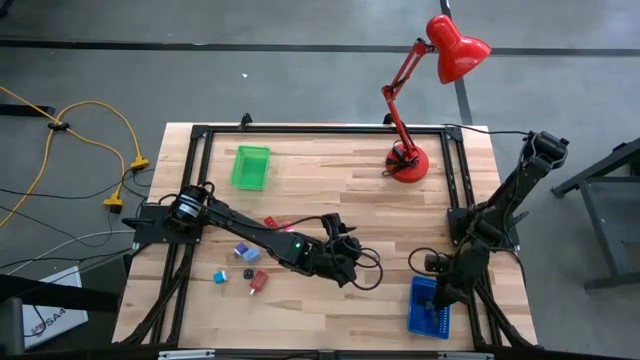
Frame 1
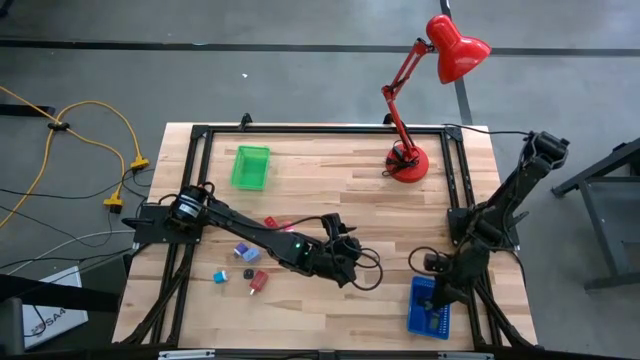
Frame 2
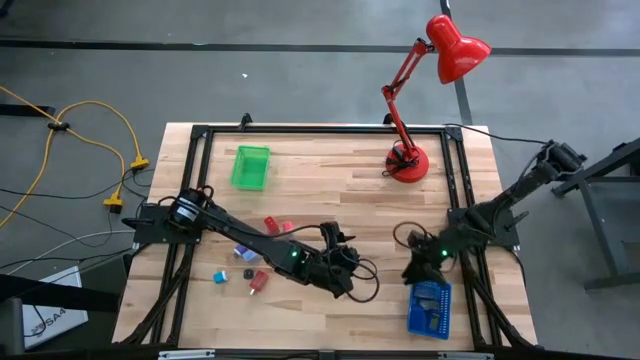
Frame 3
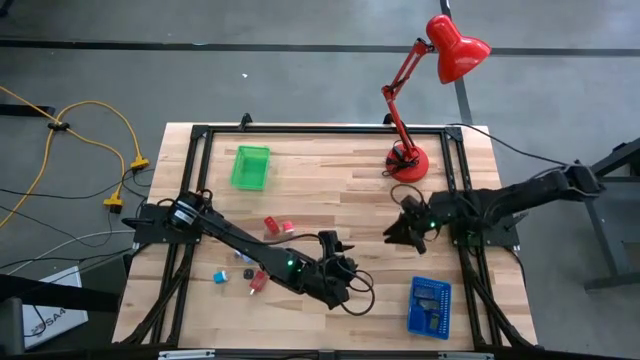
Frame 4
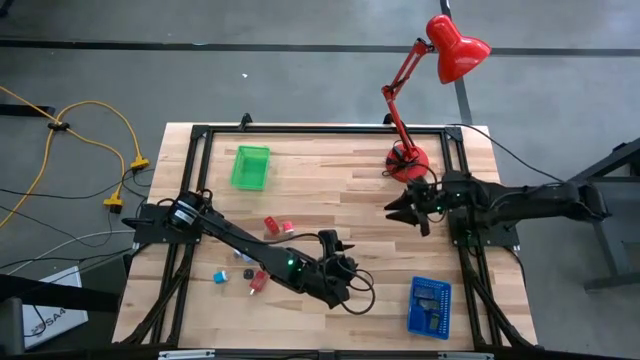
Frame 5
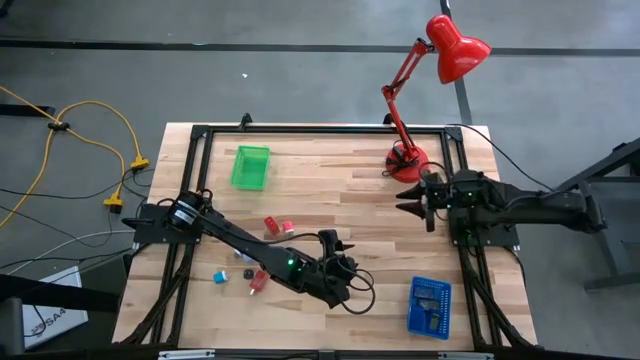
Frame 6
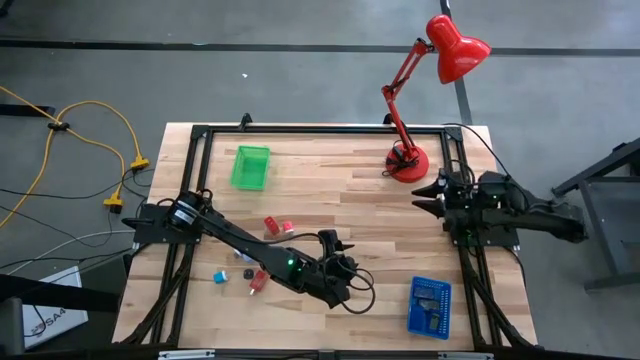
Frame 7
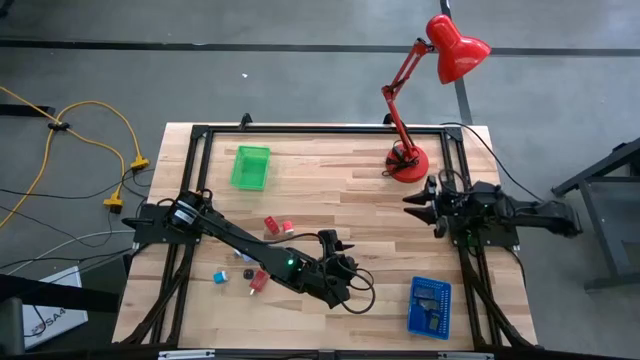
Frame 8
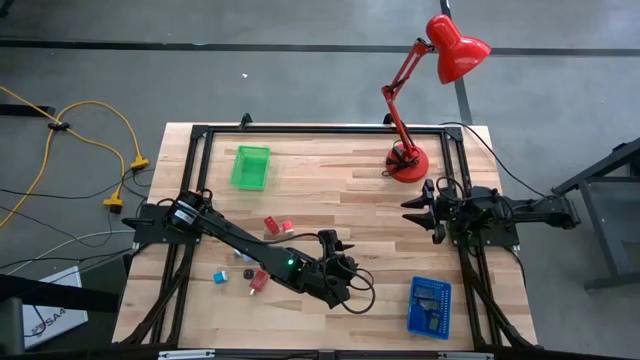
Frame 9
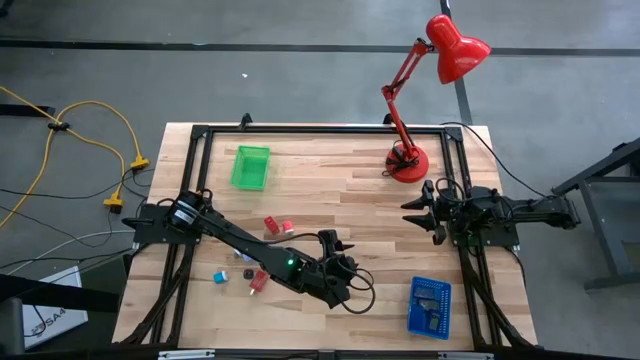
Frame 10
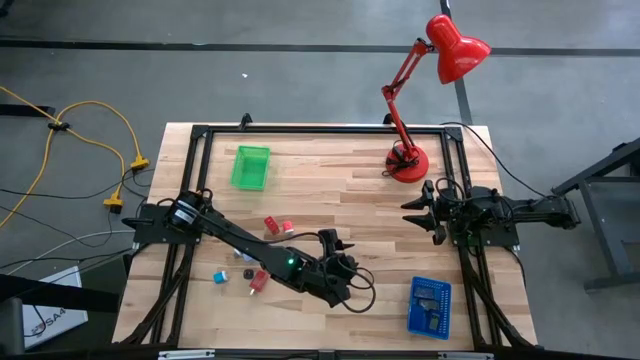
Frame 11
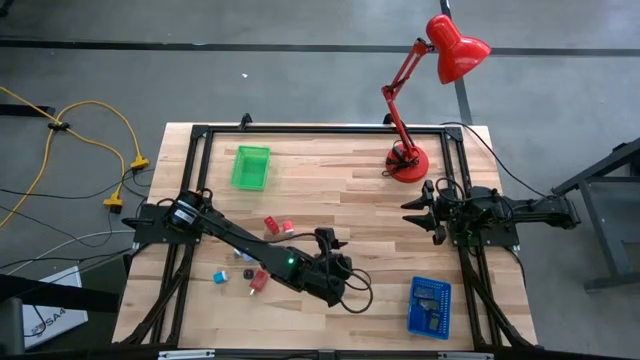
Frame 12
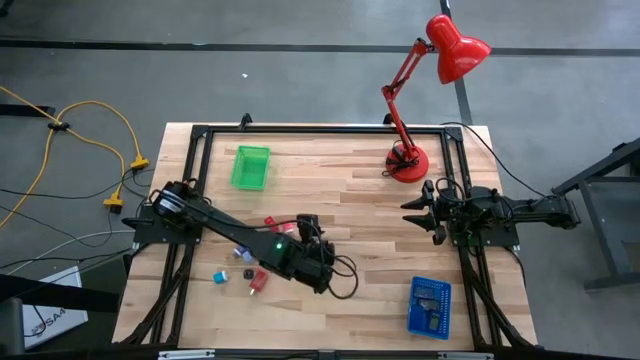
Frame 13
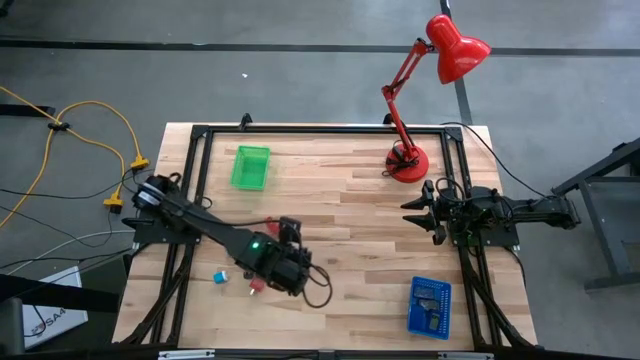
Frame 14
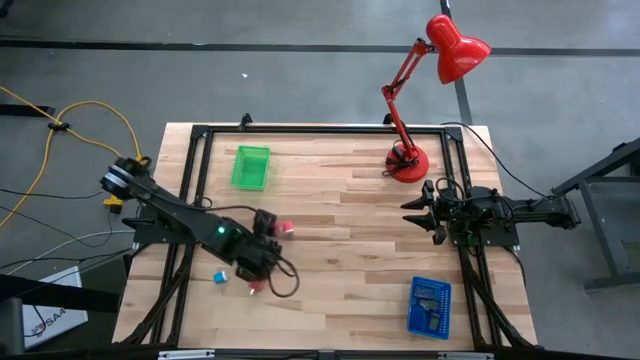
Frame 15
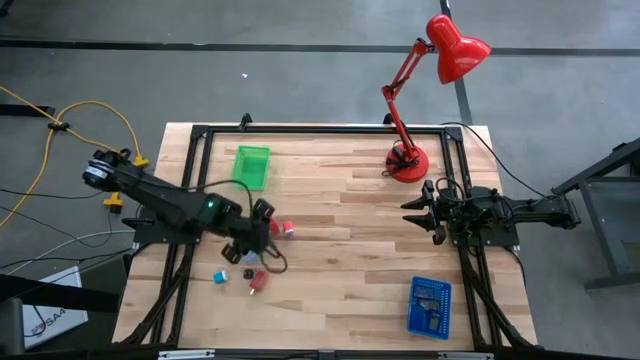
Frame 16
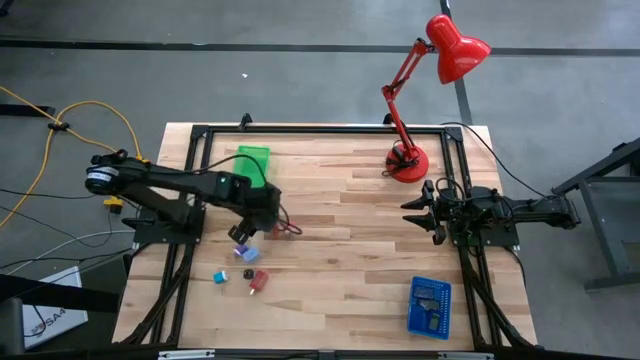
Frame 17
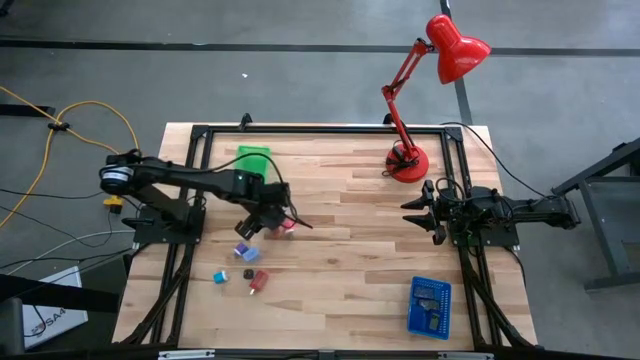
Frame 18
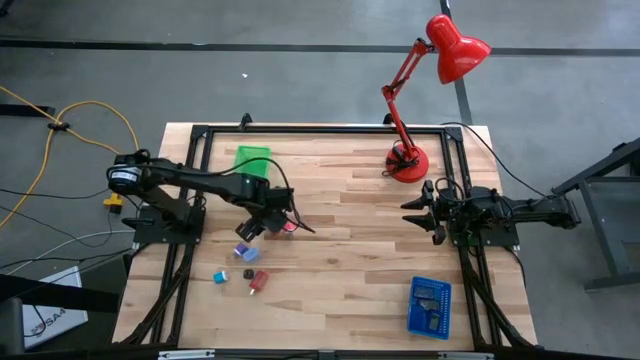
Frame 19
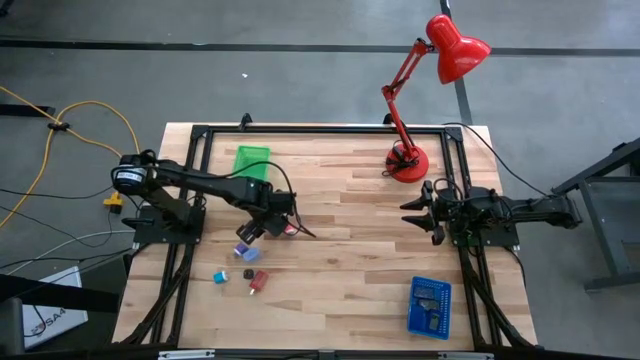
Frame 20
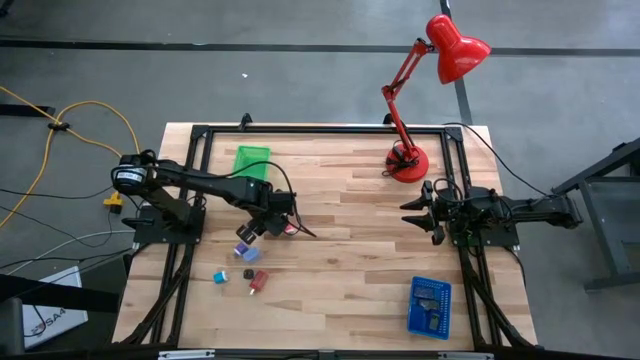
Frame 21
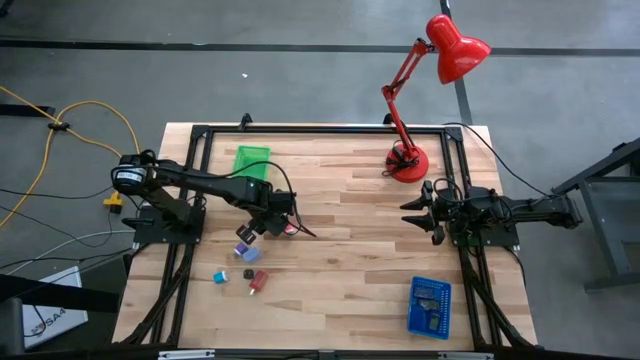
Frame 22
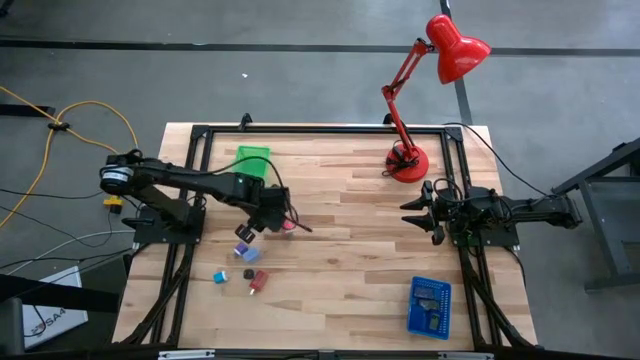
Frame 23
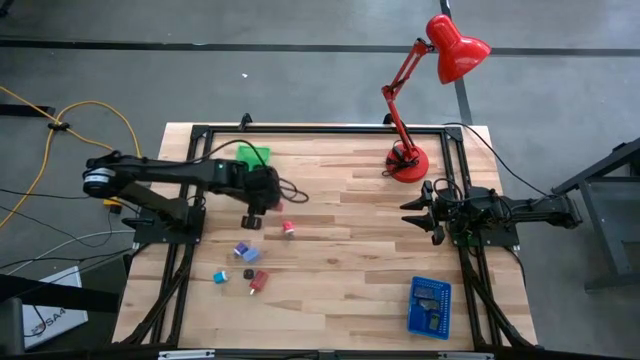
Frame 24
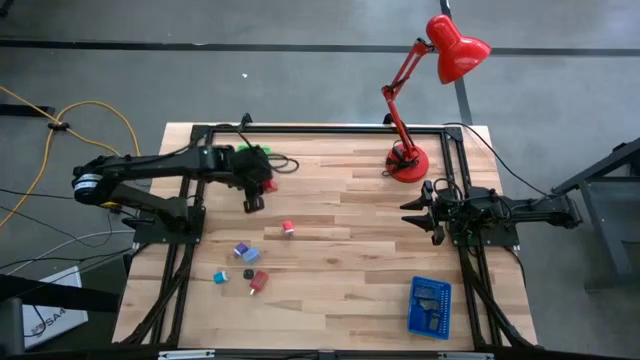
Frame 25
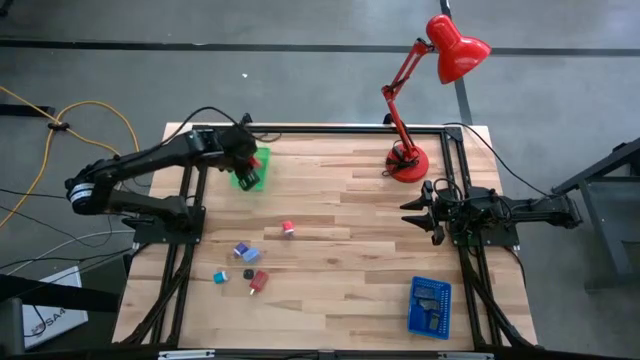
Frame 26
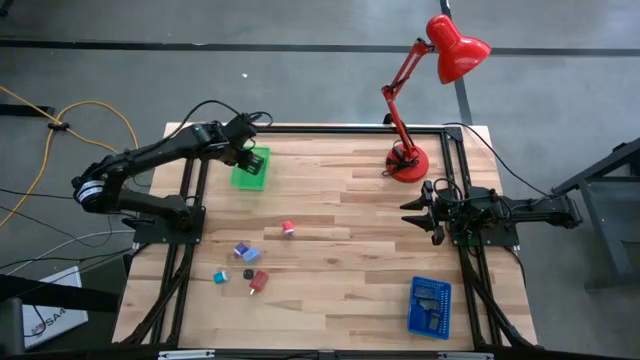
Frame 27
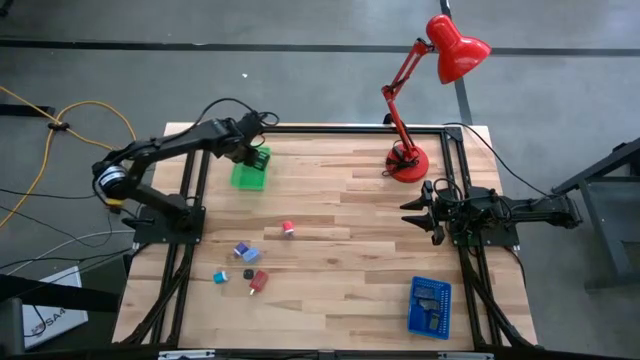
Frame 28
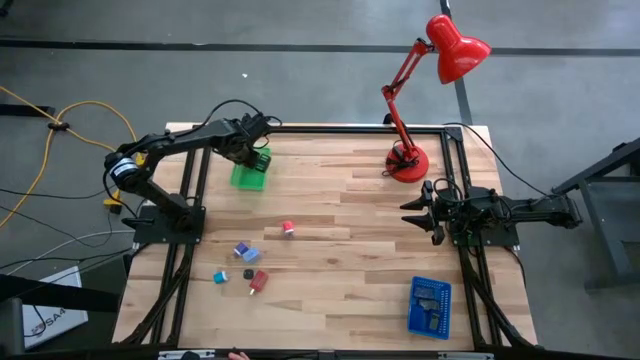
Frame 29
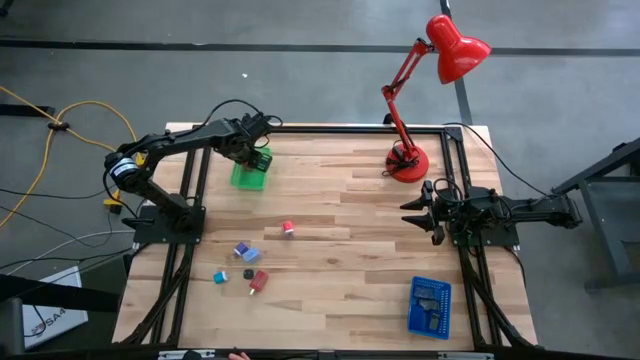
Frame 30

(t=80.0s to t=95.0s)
Task: Pick & Place Office items
Put the top red charger adapter into the green bin

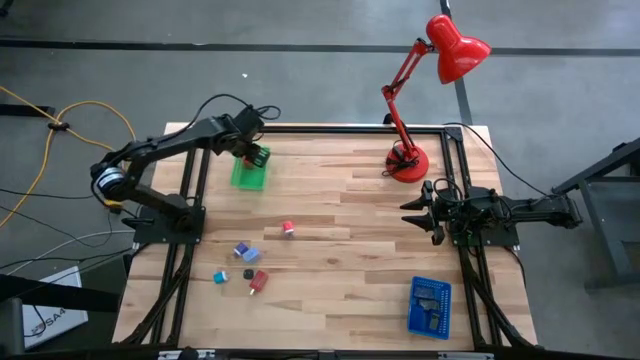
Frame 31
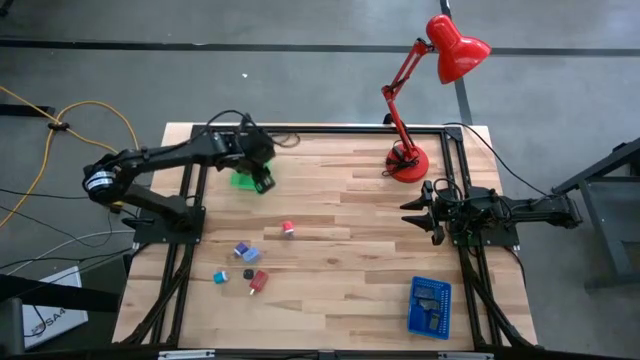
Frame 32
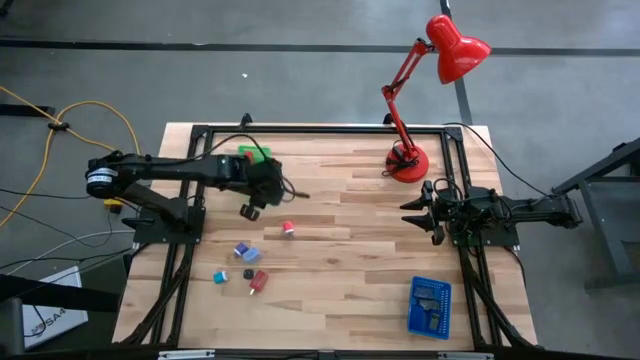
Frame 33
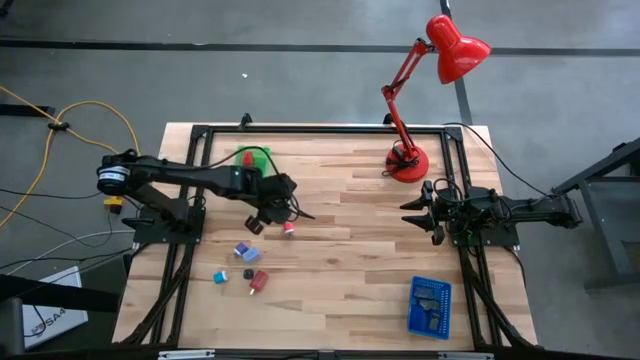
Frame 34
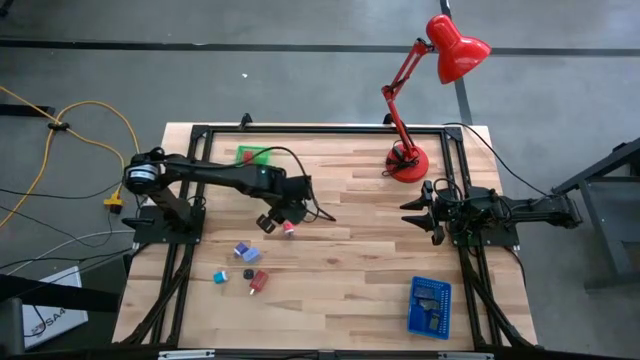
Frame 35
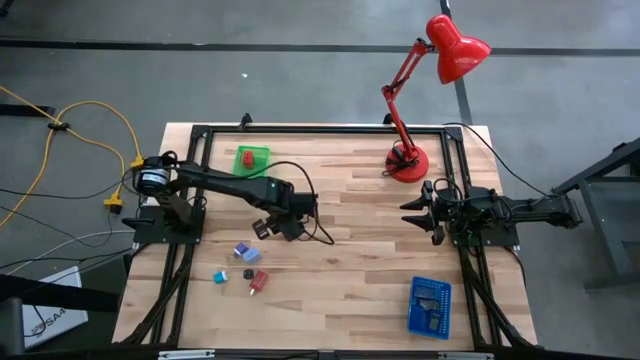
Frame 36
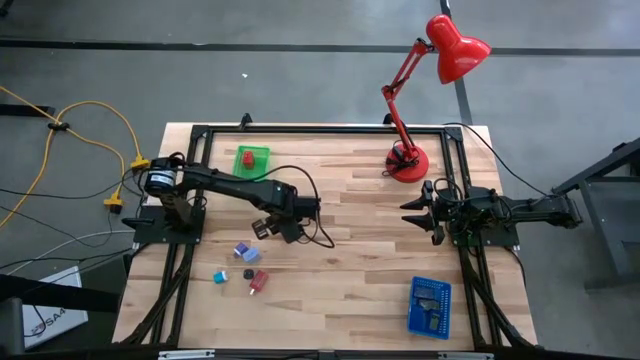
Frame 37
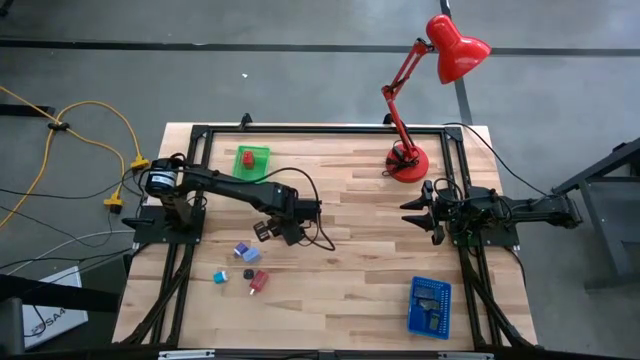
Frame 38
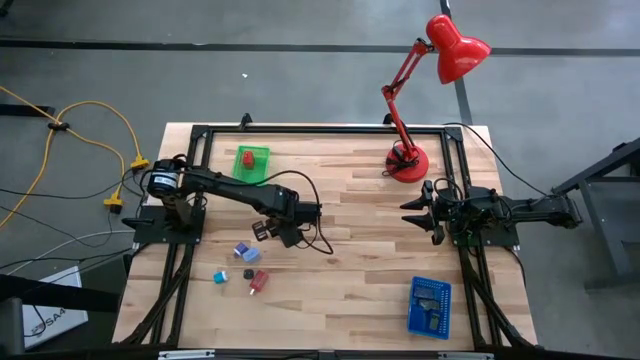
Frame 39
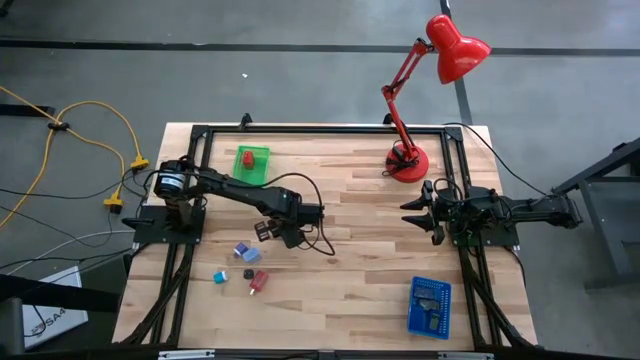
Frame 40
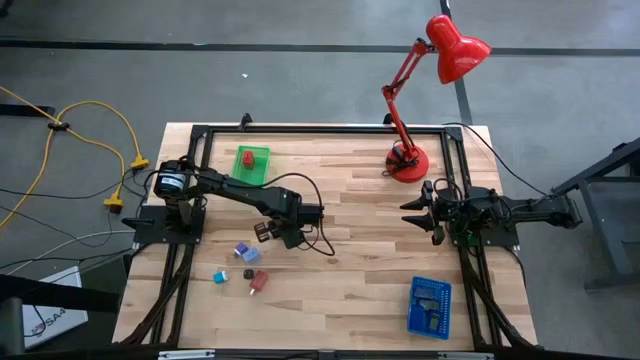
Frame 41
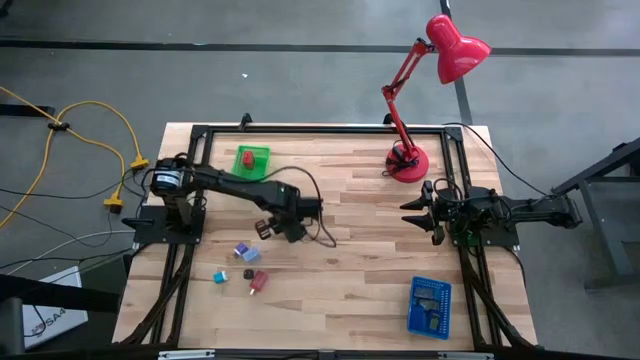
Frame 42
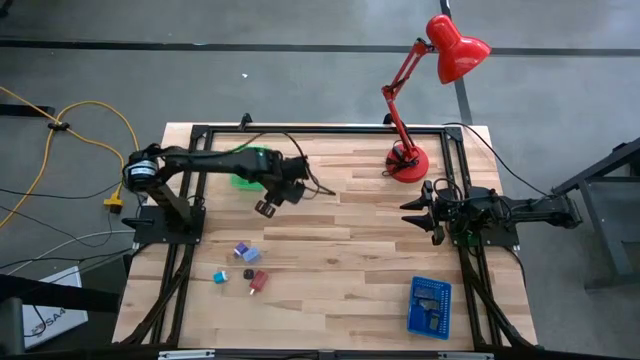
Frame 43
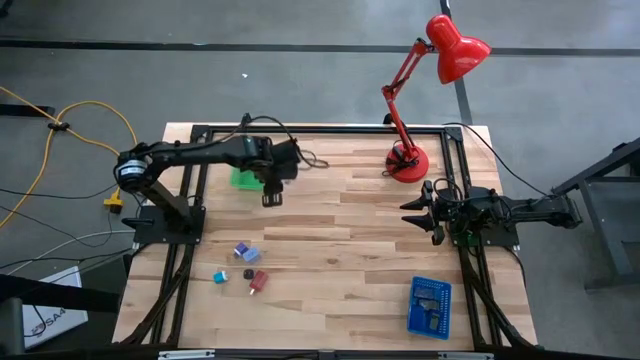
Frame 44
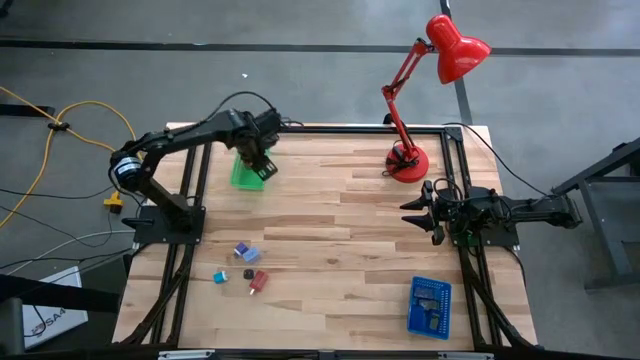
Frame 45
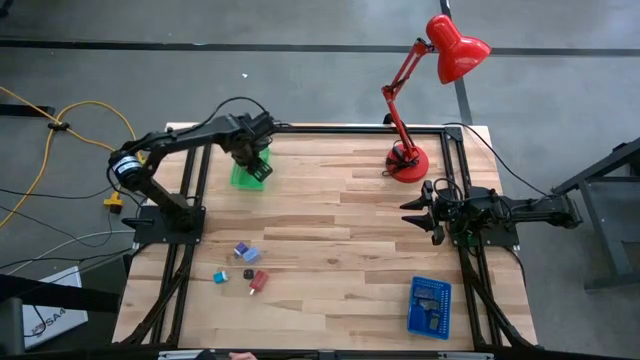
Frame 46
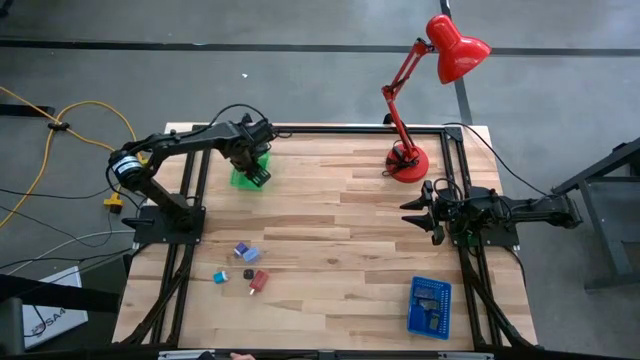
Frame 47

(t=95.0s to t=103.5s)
Put the pink charger adapter into the green bin
